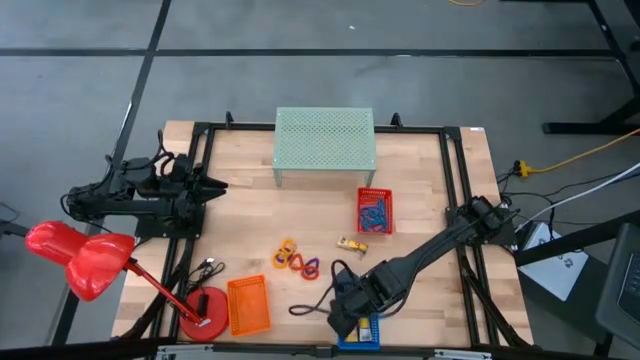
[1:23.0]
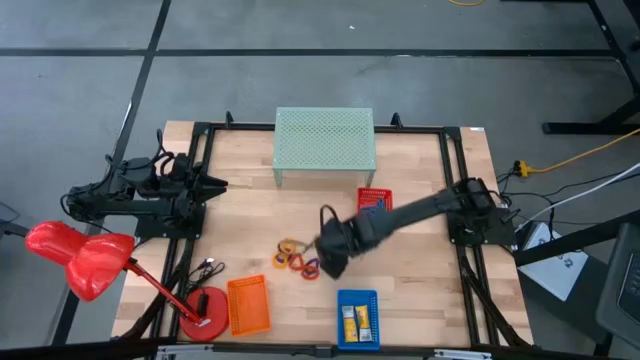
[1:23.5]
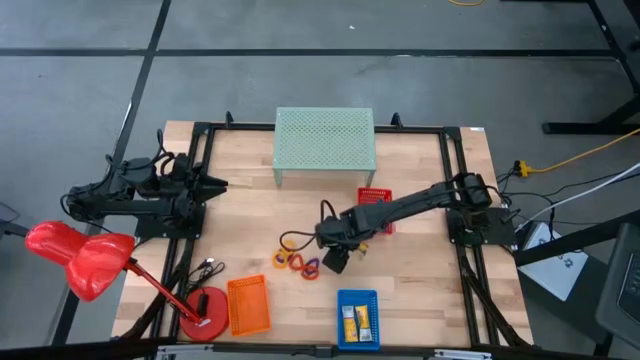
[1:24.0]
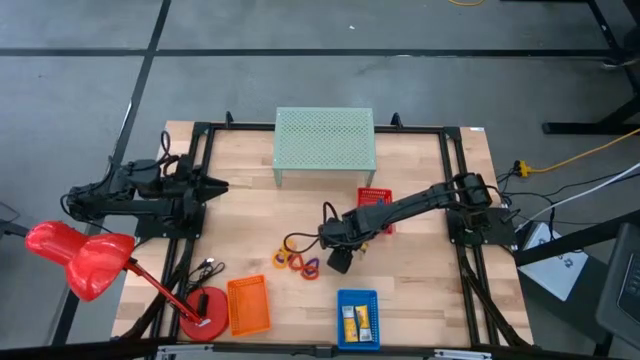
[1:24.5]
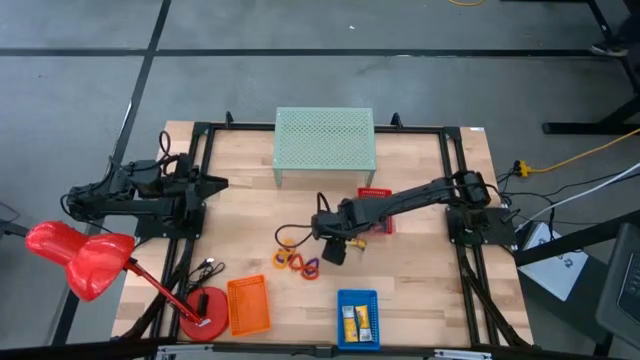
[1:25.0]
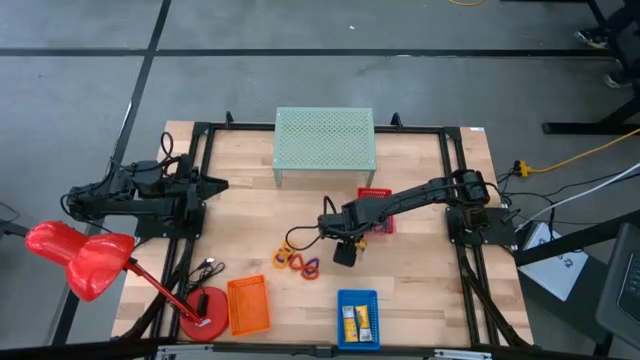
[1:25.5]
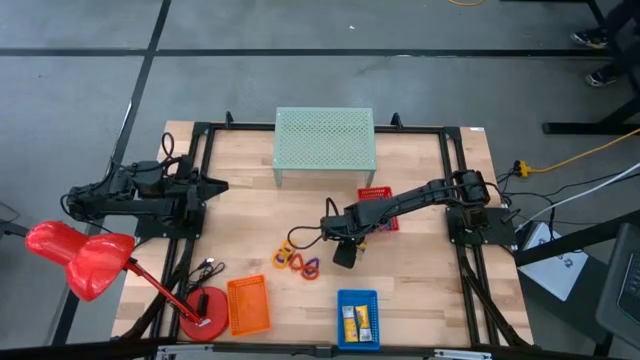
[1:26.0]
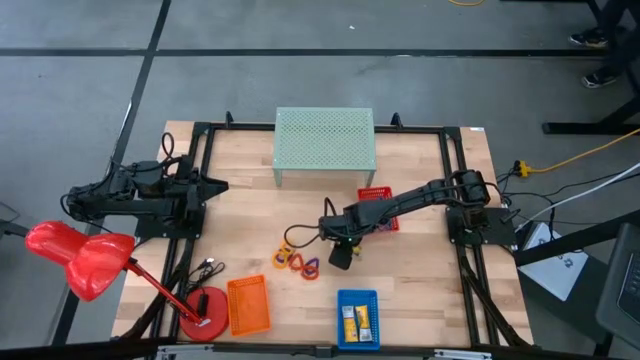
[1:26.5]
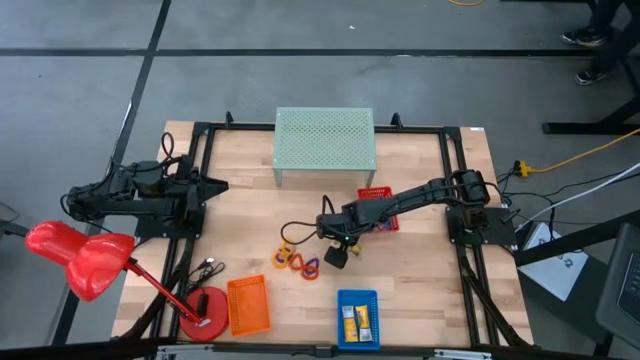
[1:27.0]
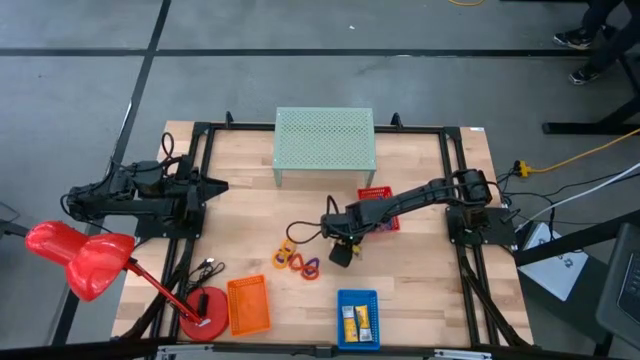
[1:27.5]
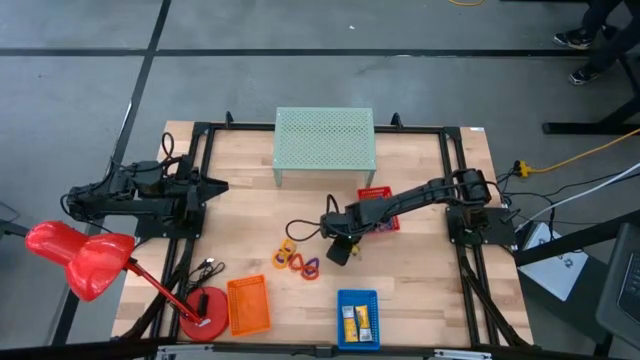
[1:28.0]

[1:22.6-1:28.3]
Task: Pick & Place Office Desk Supplies
Put the crayon box into the blue basket

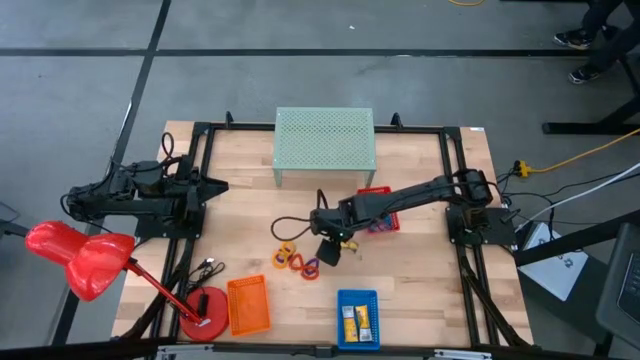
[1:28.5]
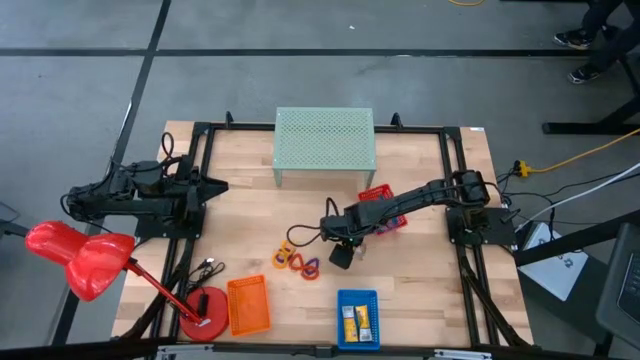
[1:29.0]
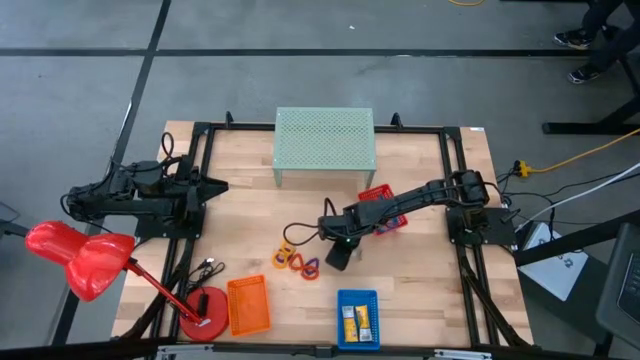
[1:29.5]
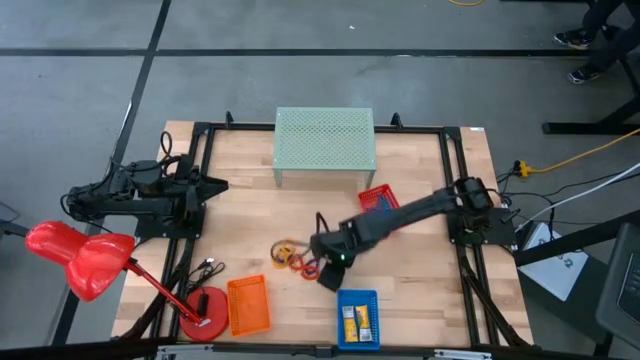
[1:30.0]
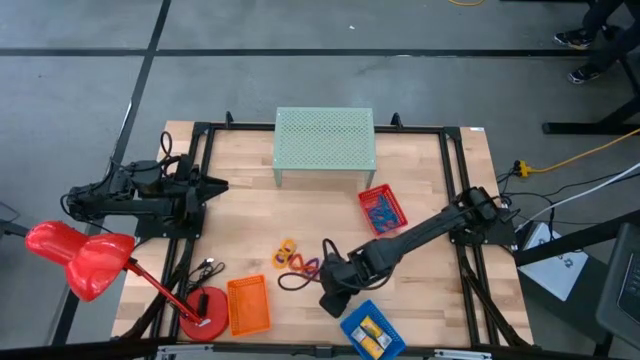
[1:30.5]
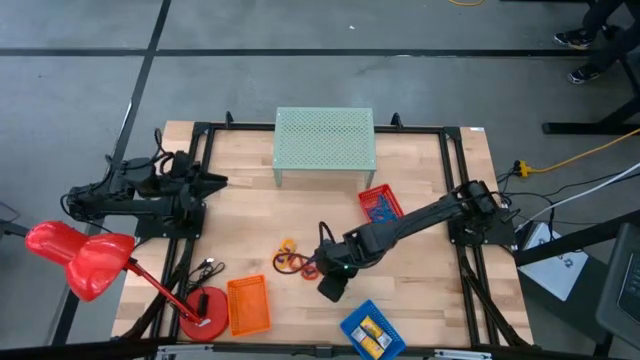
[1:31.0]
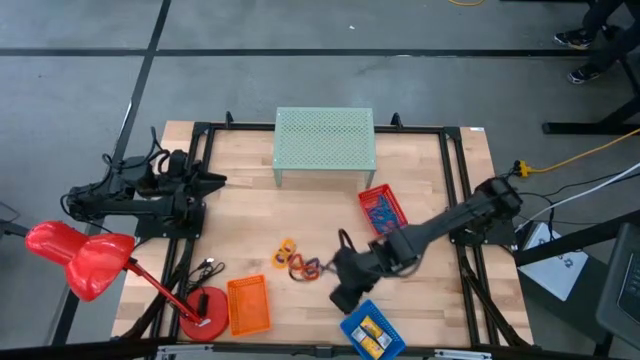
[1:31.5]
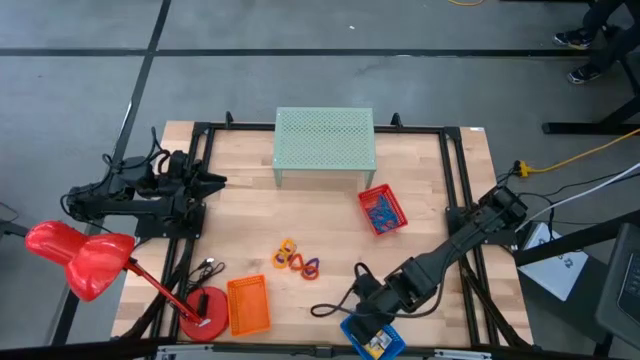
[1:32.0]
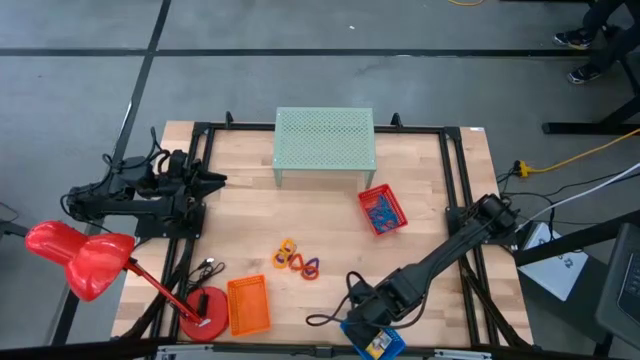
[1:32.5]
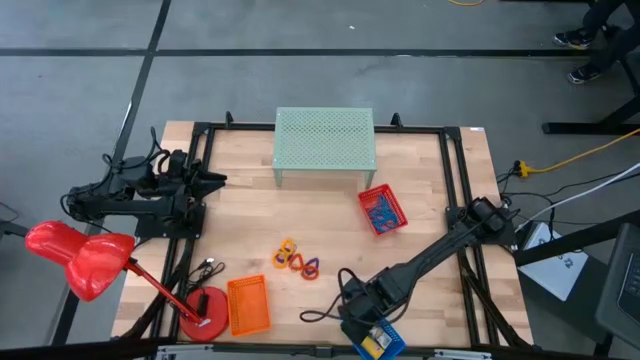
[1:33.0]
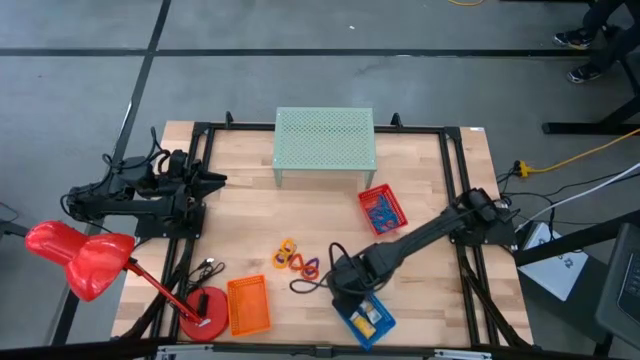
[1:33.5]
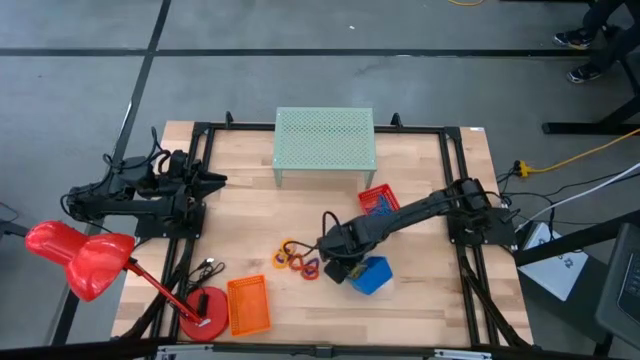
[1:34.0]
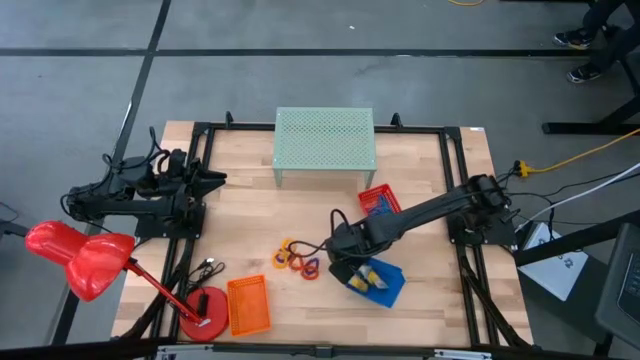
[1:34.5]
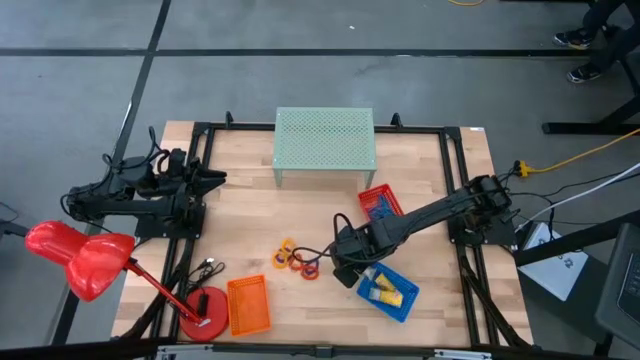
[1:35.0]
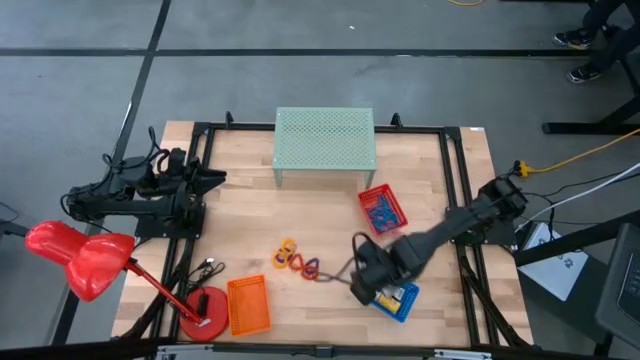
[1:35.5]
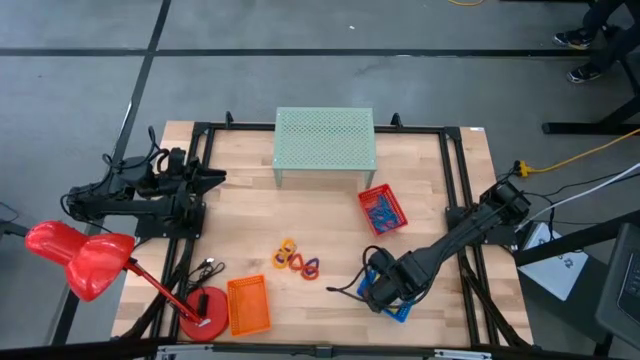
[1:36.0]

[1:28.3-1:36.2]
Put the crayon box into the blue basket

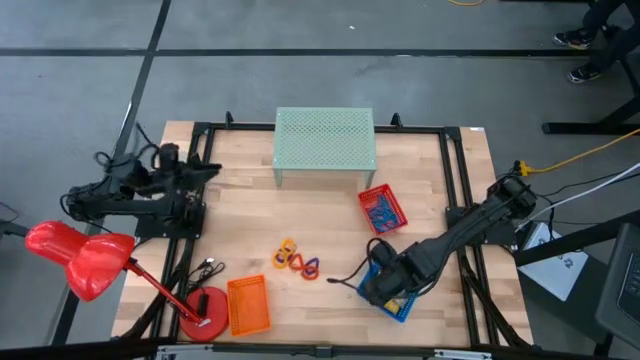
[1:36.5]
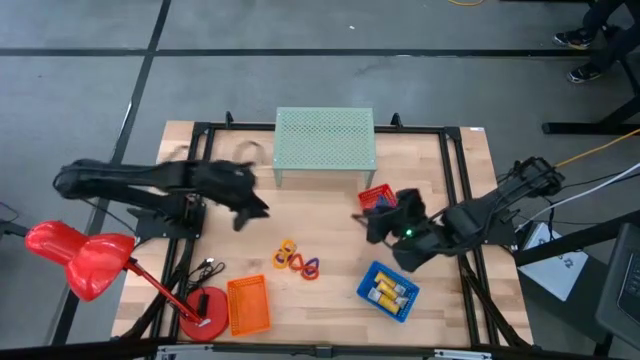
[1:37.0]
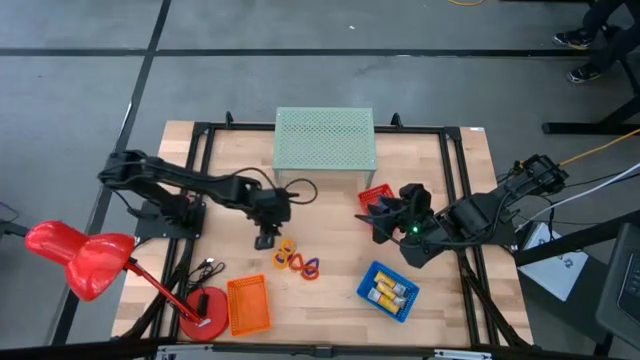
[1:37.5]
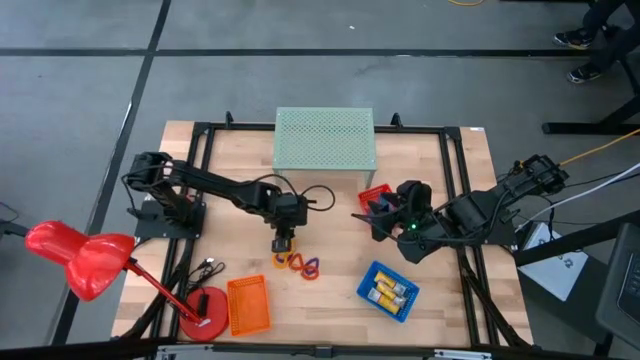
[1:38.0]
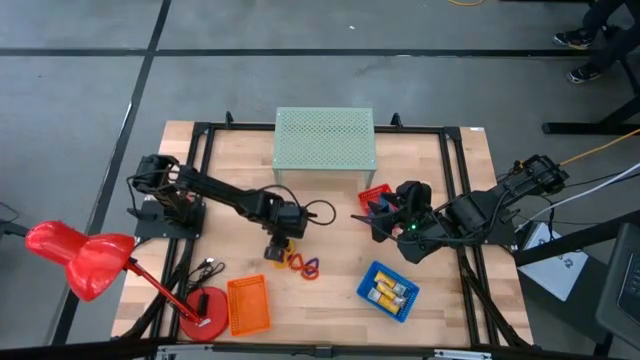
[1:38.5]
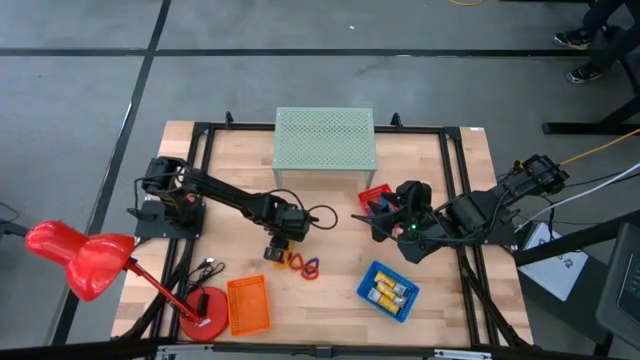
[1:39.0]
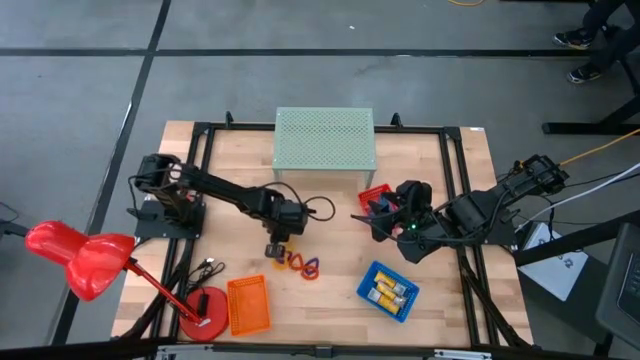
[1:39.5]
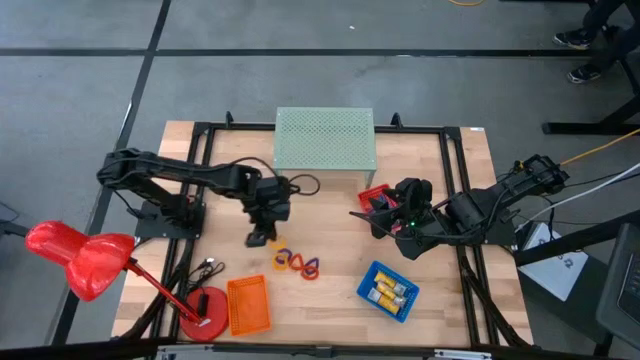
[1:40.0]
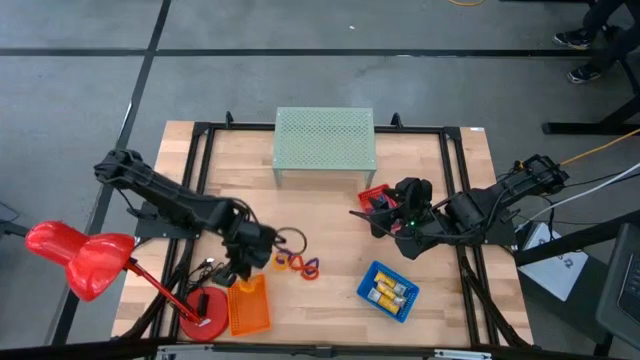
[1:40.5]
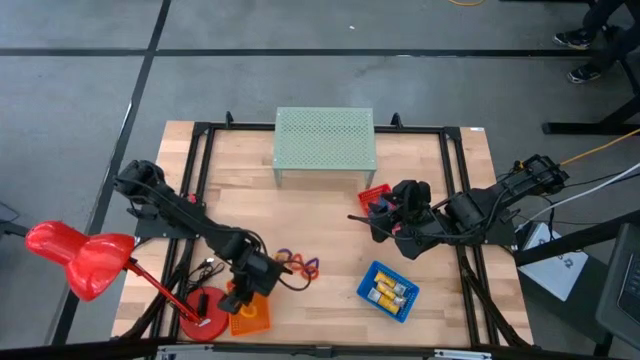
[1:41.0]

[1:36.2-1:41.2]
Put the yellow spring rubber band into the orange basket

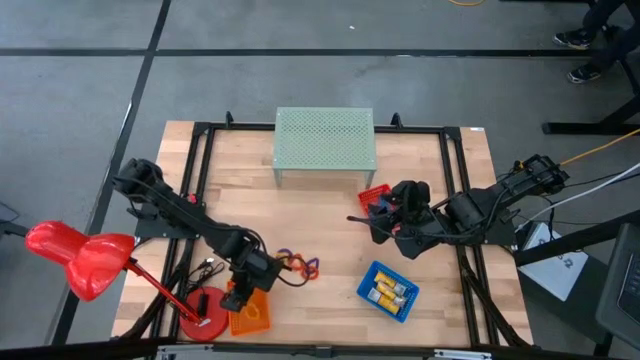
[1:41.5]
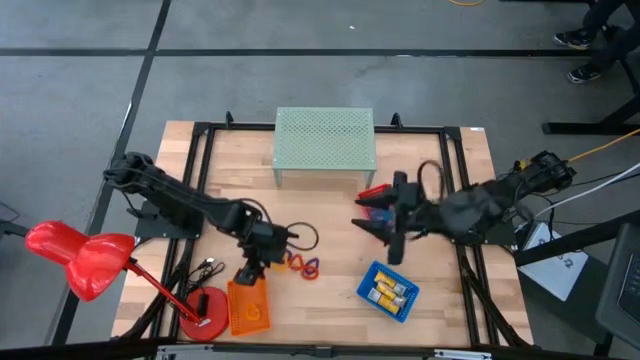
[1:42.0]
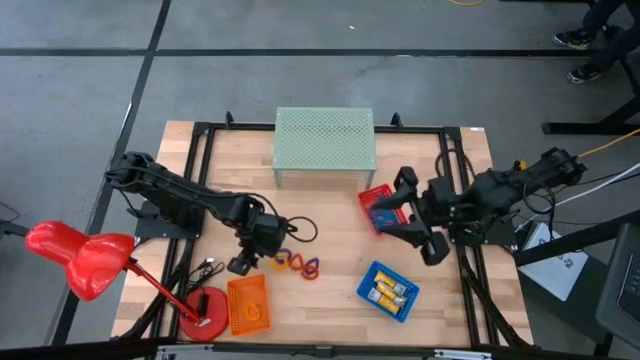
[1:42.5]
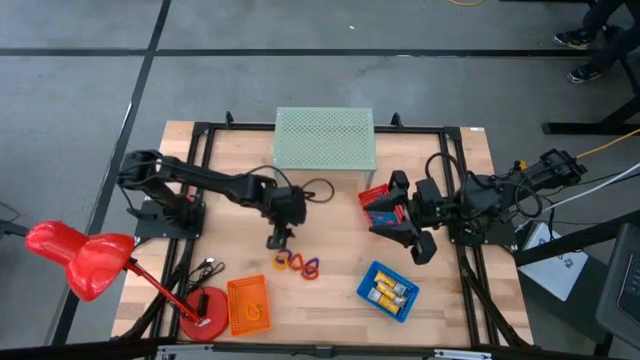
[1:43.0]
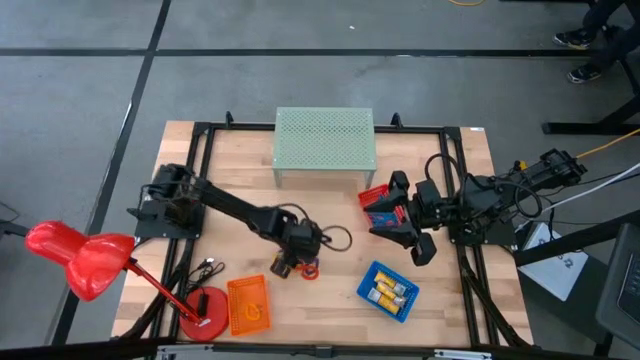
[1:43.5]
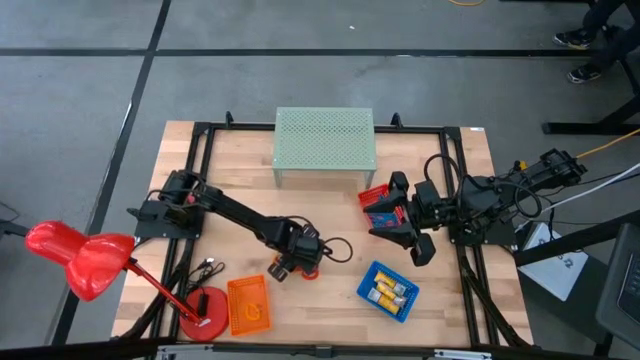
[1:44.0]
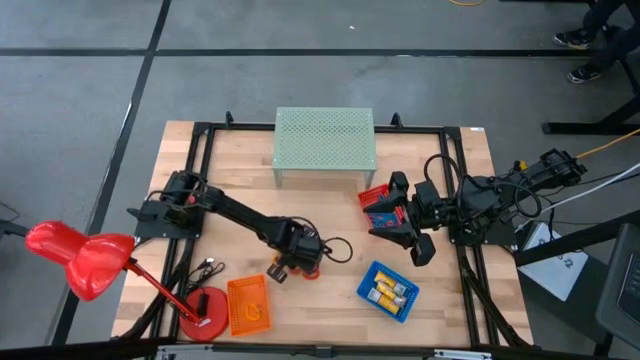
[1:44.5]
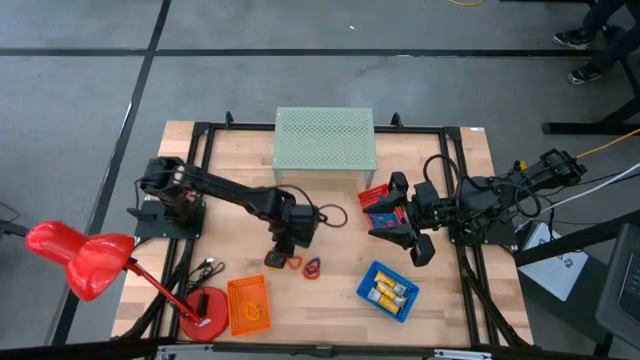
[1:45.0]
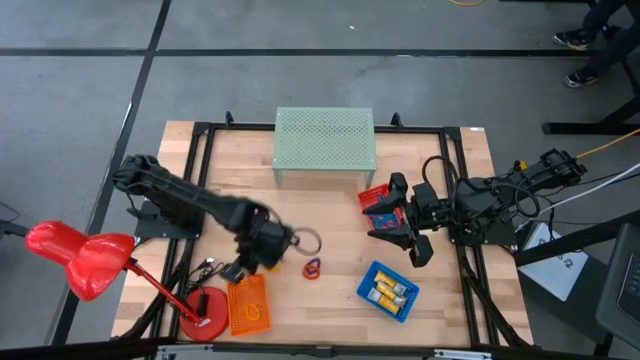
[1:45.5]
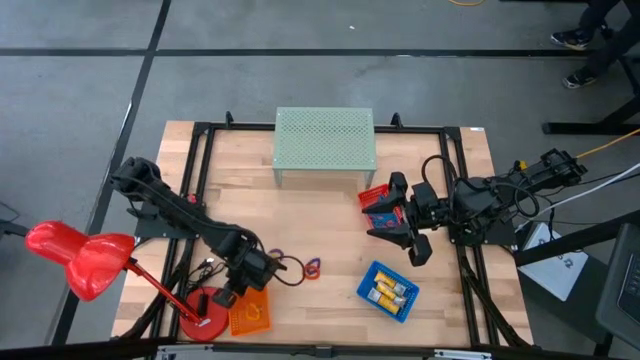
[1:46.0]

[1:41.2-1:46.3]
Put the orange spring rubber band into the orange basket
